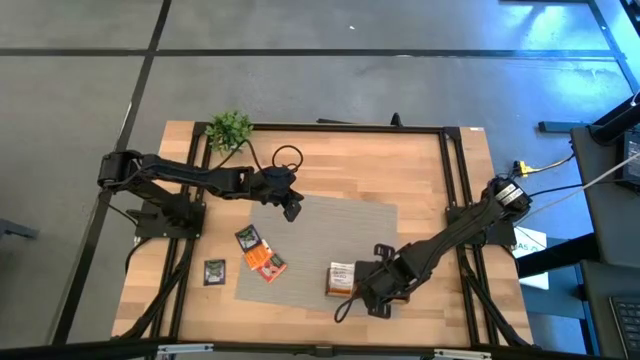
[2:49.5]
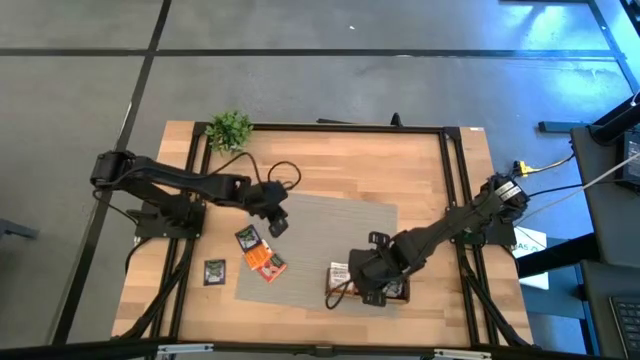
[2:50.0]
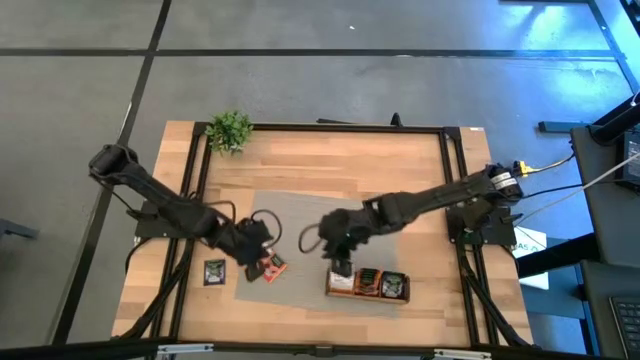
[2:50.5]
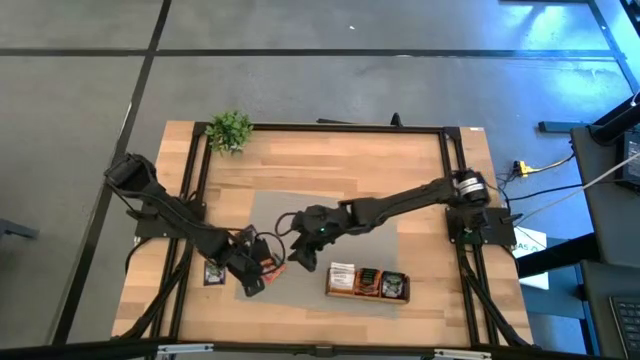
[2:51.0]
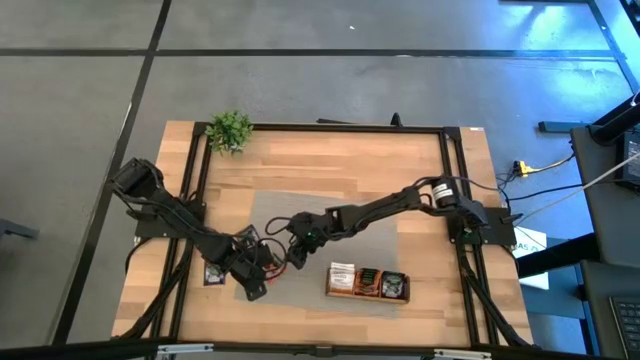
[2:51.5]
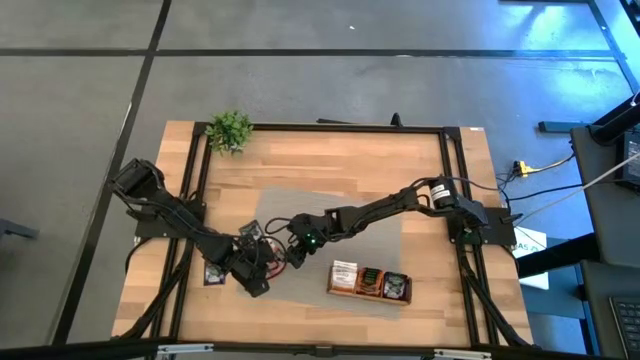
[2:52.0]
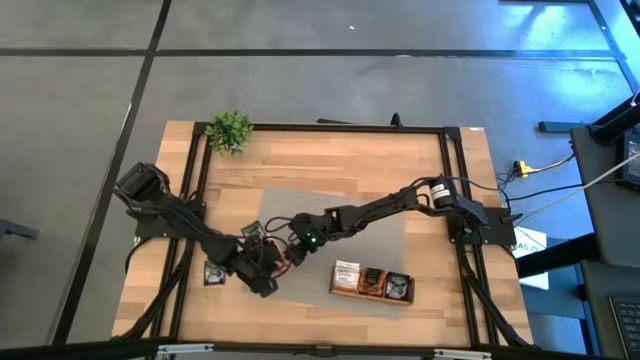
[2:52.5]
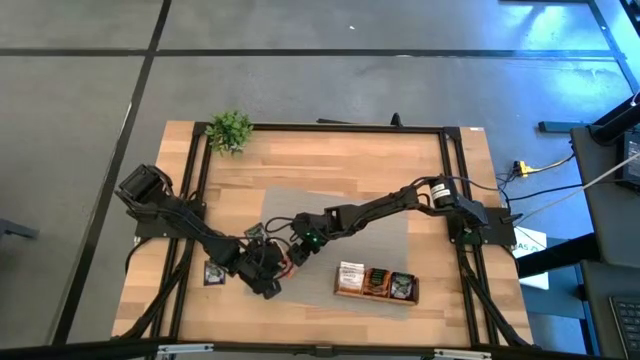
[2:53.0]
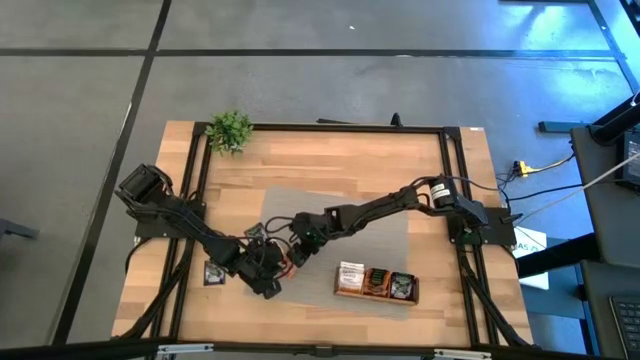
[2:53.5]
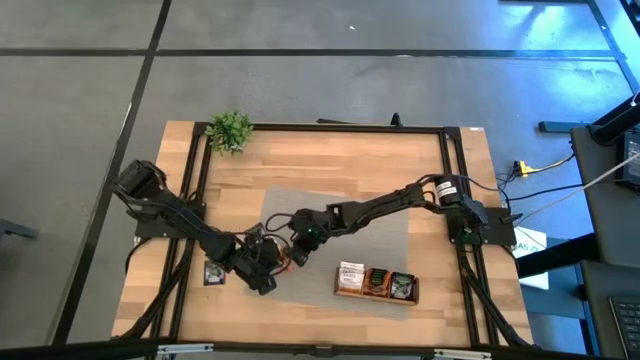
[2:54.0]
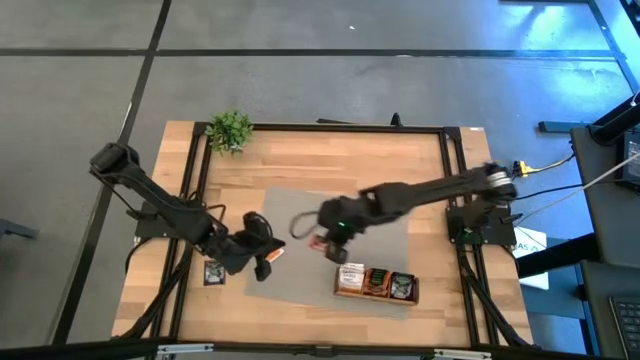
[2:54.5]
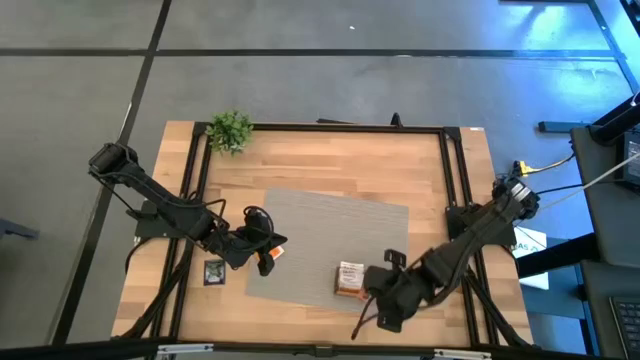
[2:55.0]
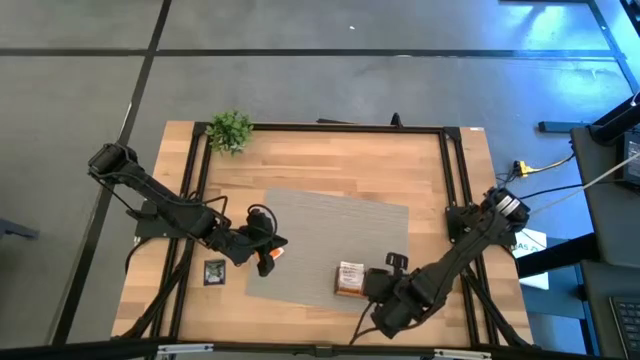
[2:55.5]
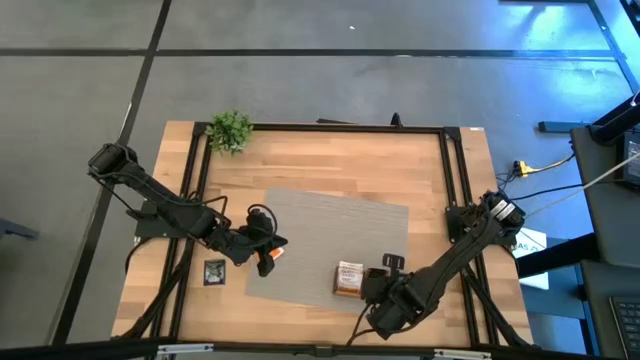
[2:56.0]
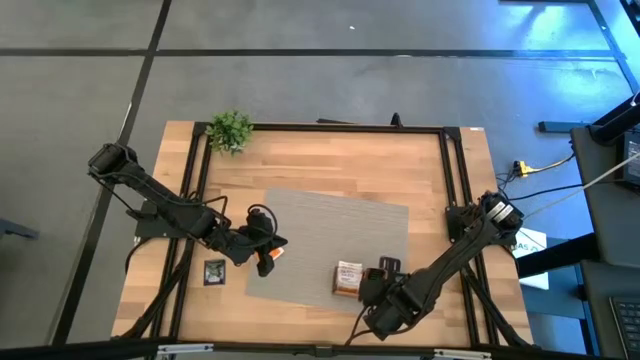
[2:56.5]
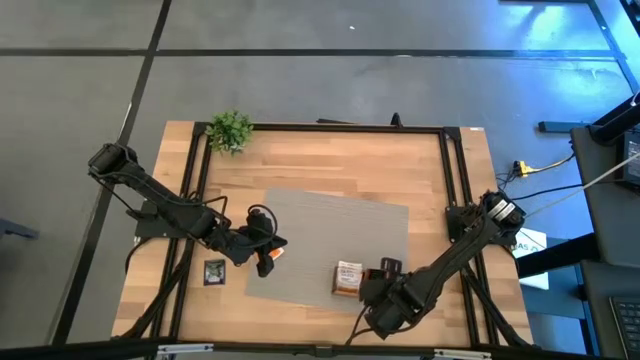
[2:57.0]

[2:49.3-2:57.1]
Task: Pick & Place Tea
Put the yellow tea bag into the middle compartment of the wooden organizer

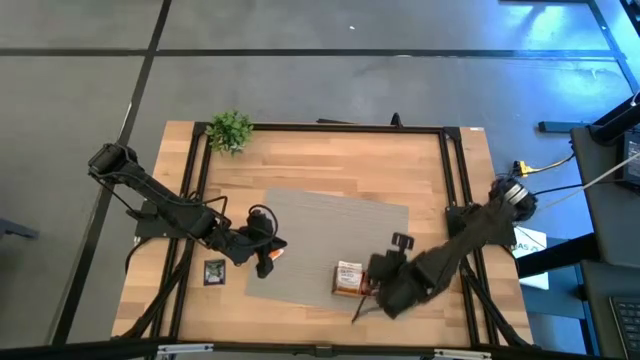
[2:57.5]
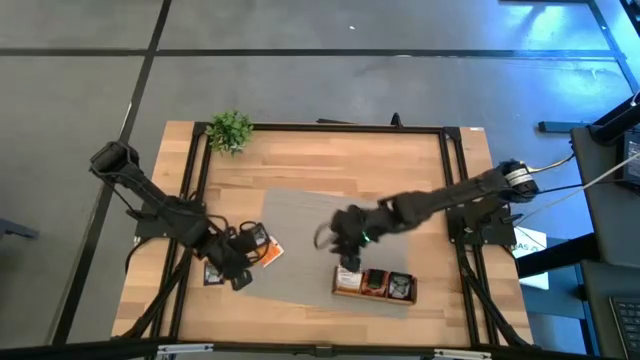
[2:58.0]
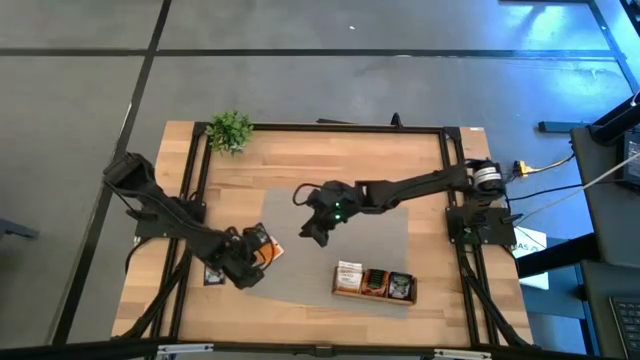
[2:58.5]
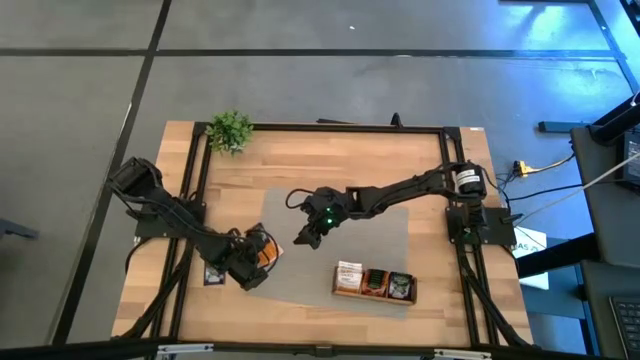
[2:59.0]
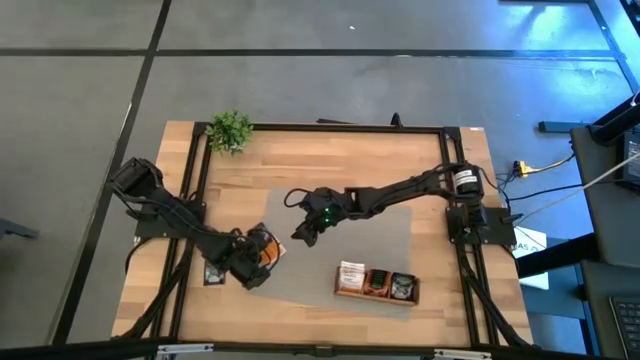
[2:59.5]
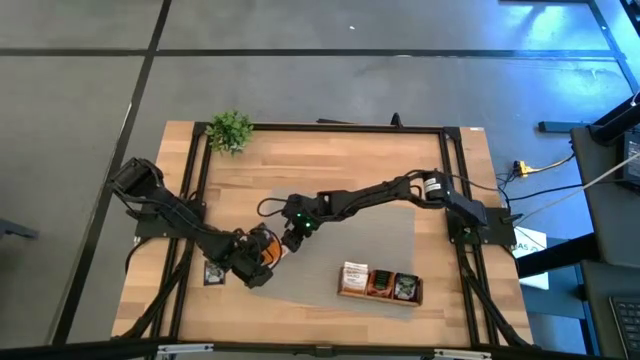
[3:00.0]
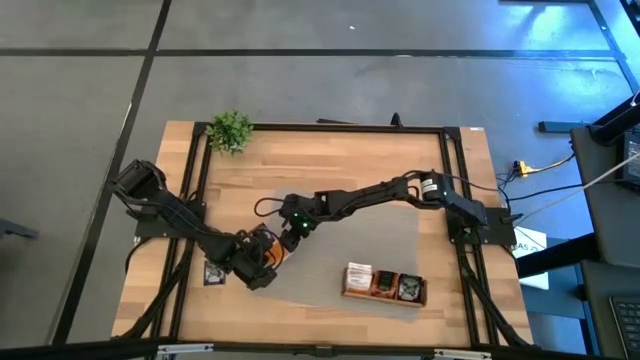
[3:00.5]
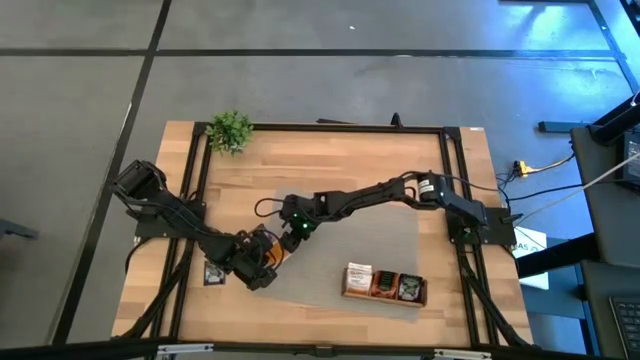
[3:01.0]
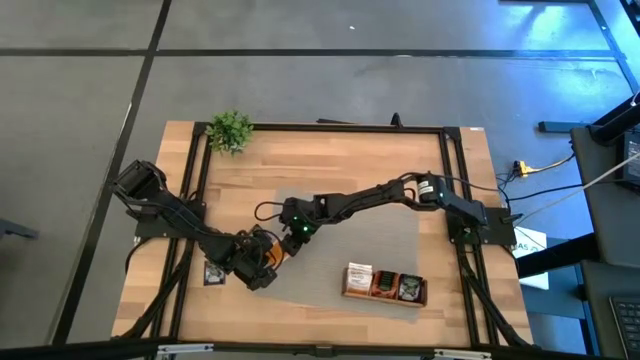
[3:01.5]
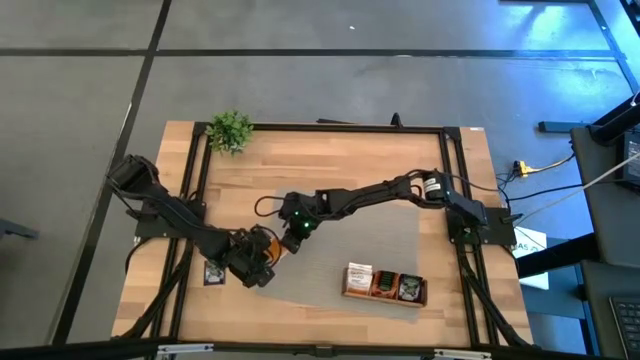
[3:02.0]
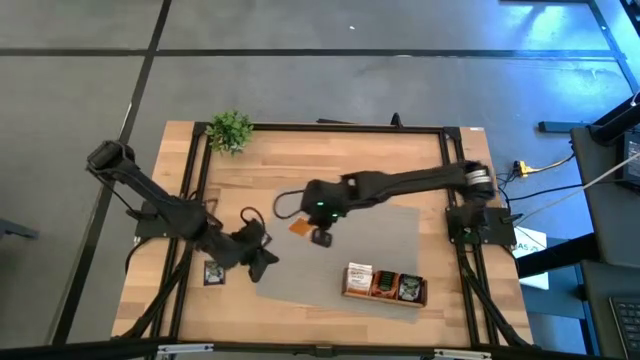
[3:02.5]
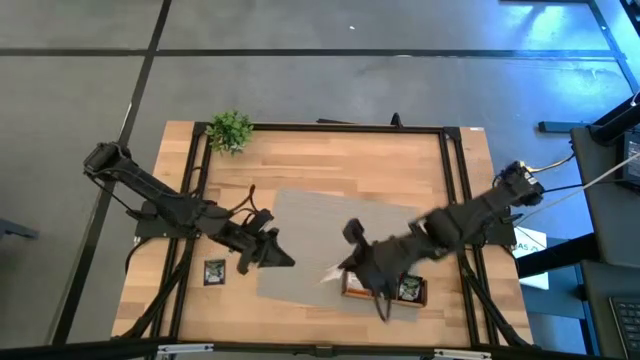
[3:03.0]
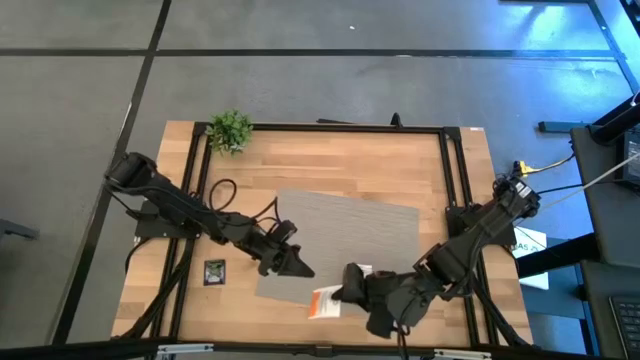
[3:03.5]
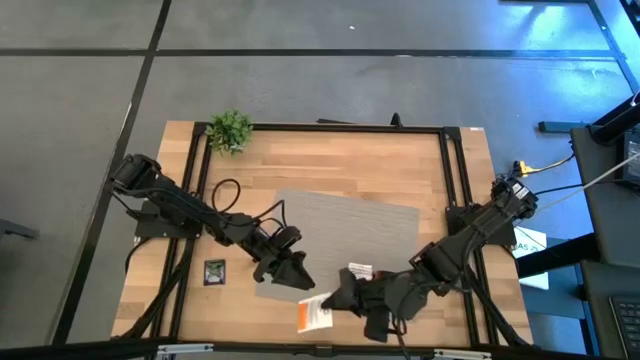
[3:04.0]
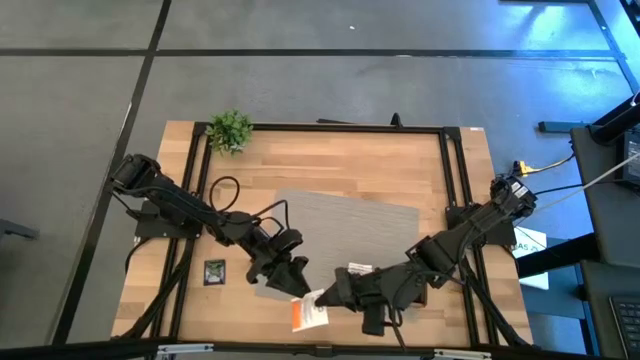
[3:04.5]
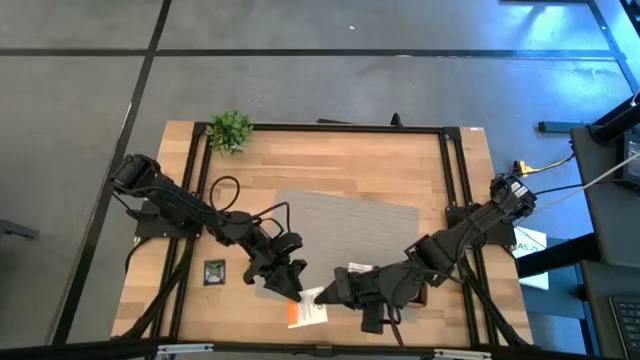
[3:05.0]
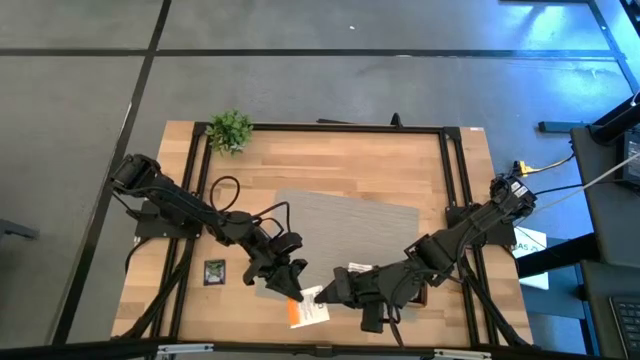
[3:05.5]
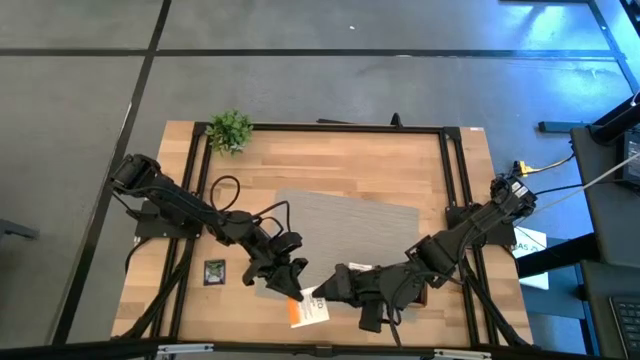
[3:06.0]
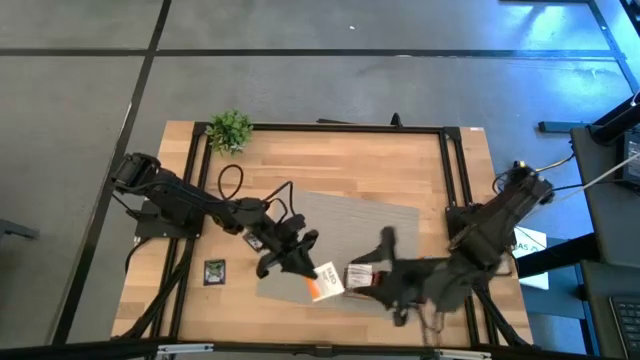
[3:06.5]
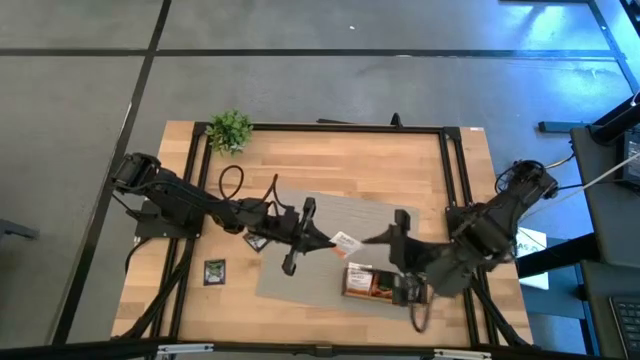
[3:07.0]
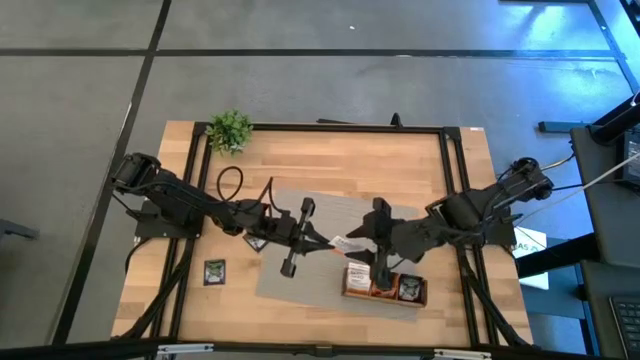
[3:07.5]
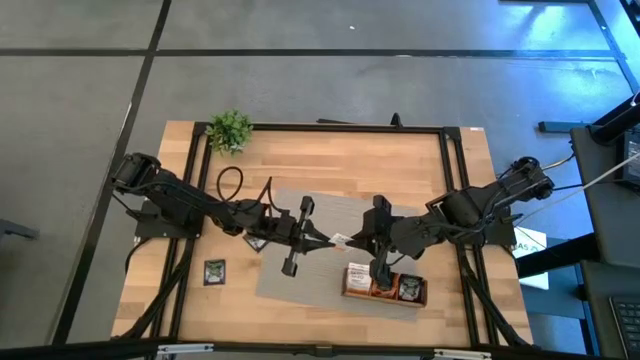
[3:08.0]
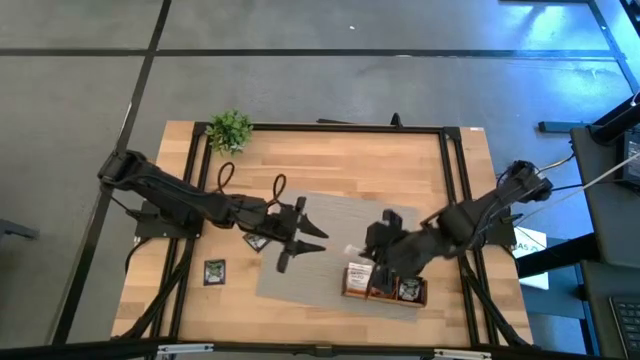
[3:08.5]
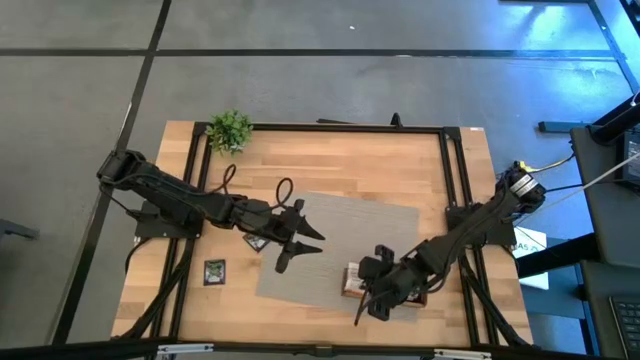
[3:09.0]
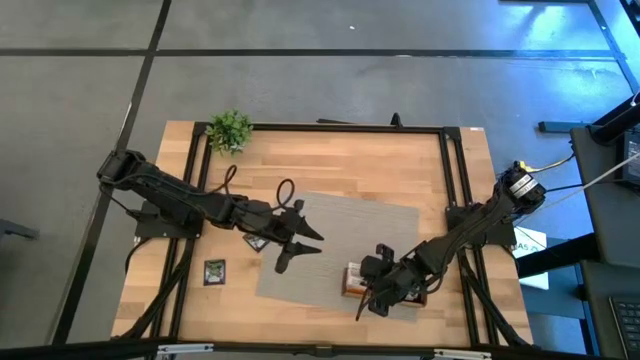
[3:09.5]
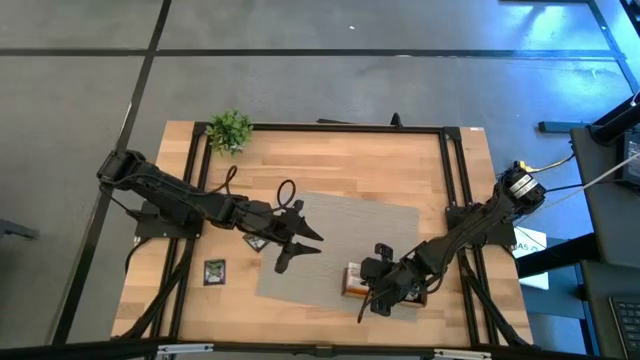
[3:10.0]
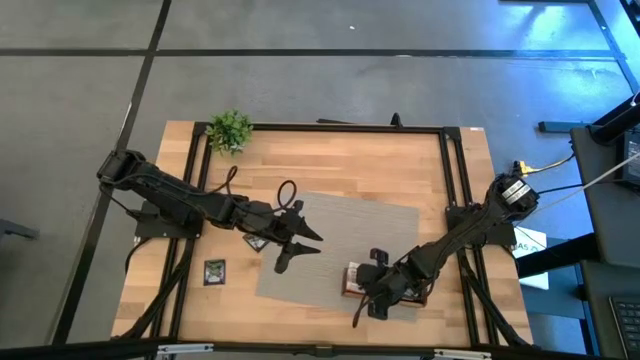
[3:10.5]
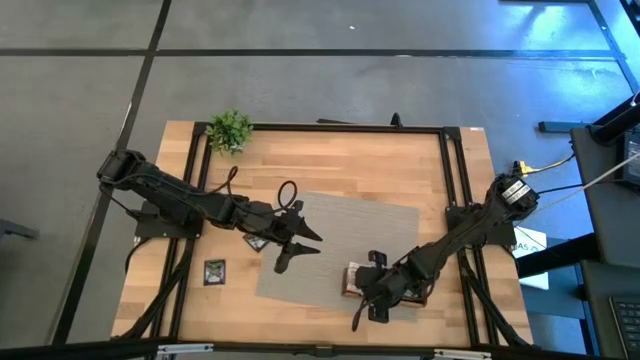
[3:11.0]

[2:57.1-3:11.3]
Put the orange tea bag into the left compartment of the wooden organizer
